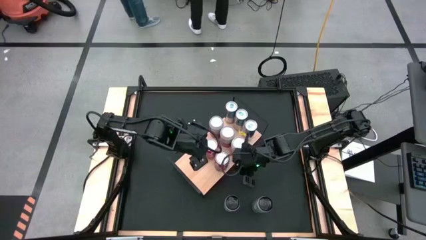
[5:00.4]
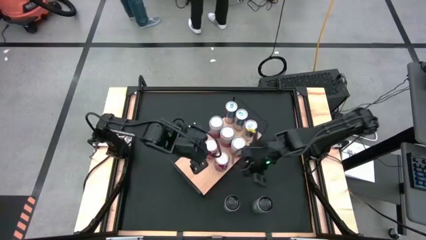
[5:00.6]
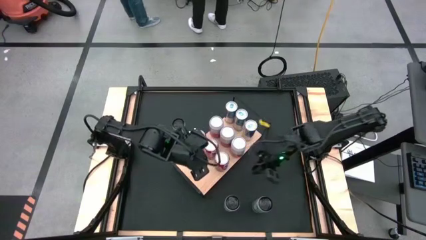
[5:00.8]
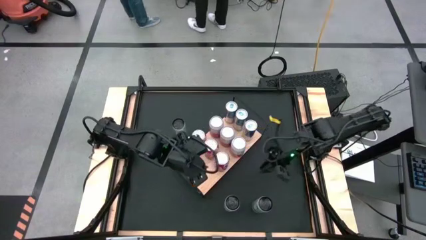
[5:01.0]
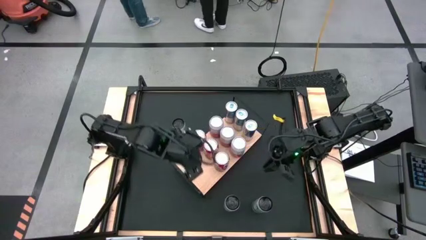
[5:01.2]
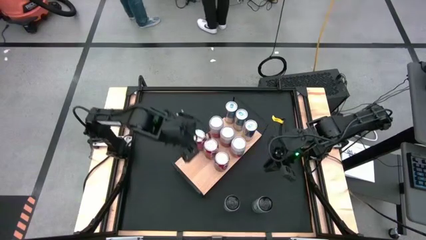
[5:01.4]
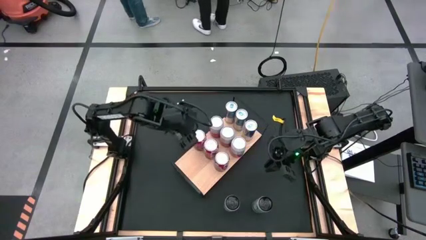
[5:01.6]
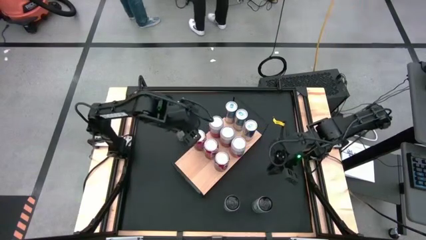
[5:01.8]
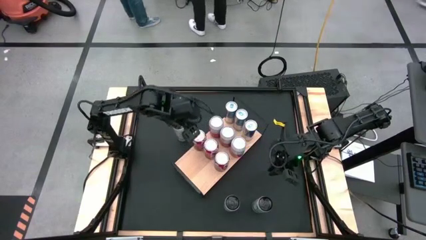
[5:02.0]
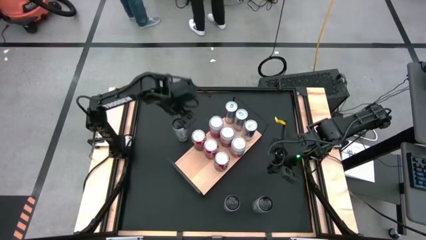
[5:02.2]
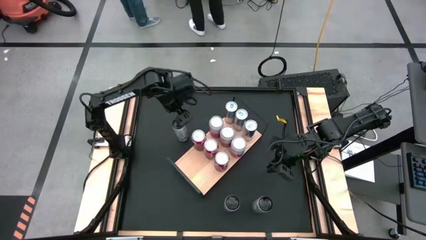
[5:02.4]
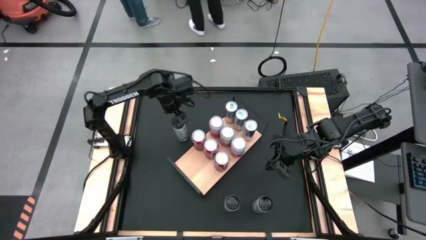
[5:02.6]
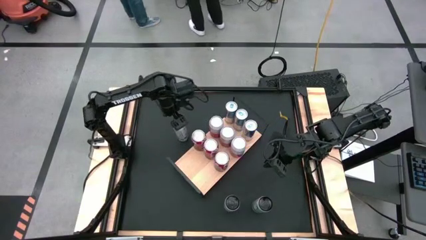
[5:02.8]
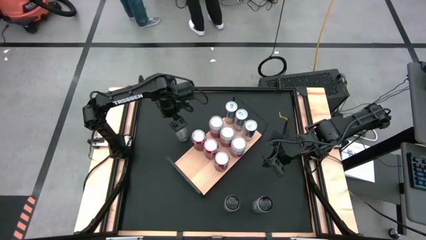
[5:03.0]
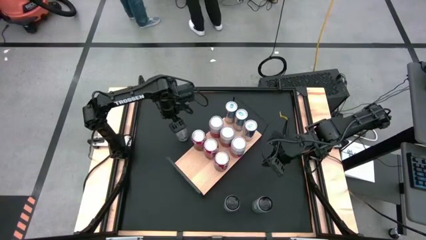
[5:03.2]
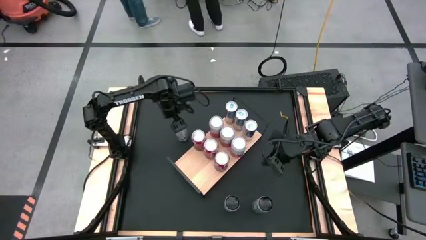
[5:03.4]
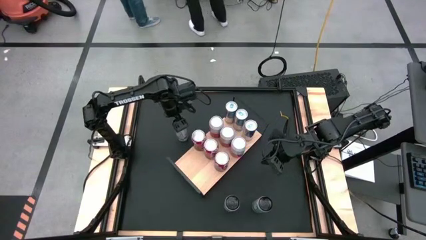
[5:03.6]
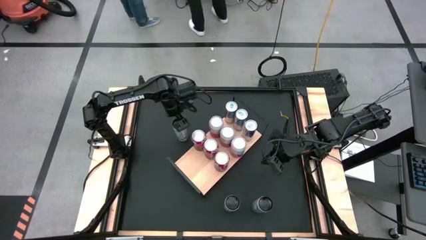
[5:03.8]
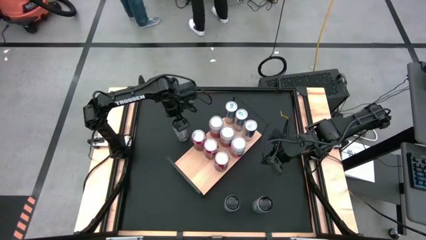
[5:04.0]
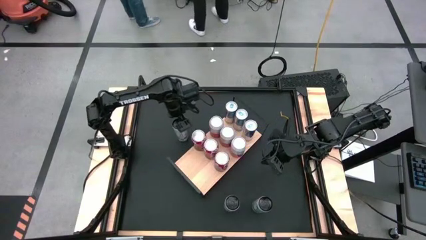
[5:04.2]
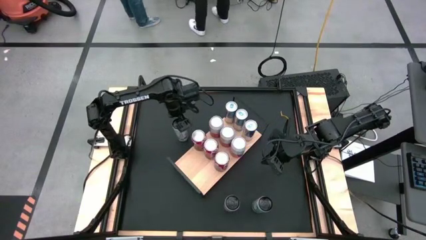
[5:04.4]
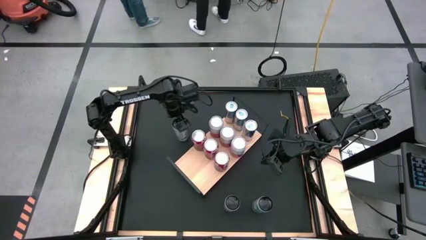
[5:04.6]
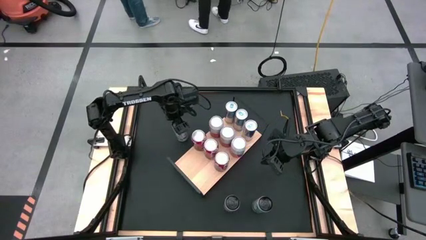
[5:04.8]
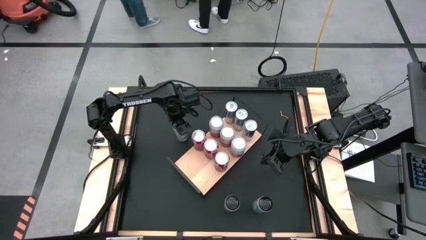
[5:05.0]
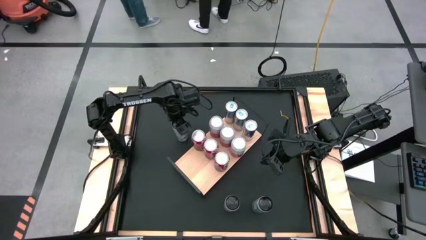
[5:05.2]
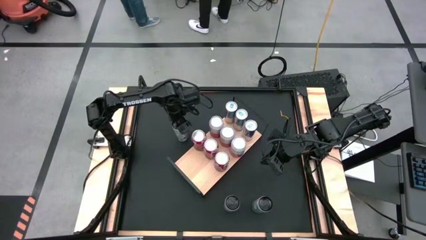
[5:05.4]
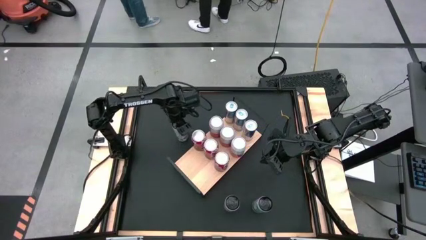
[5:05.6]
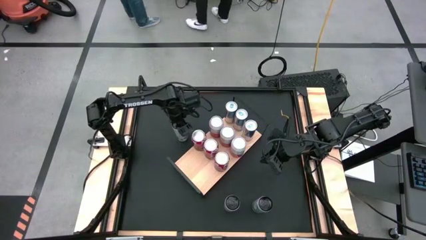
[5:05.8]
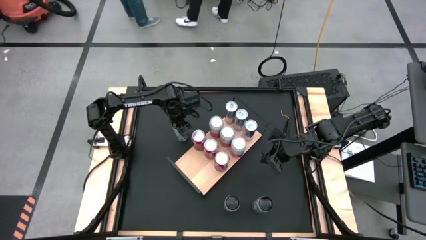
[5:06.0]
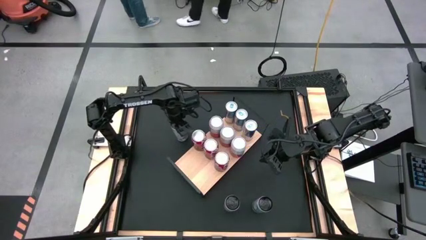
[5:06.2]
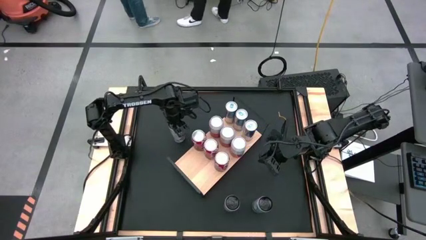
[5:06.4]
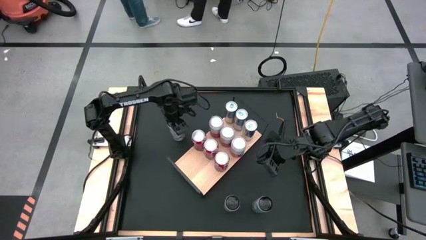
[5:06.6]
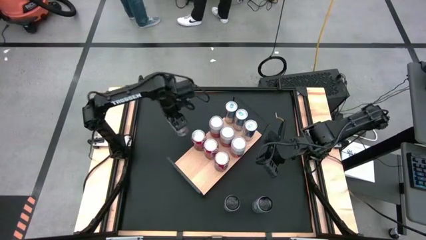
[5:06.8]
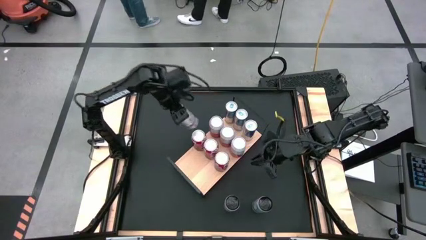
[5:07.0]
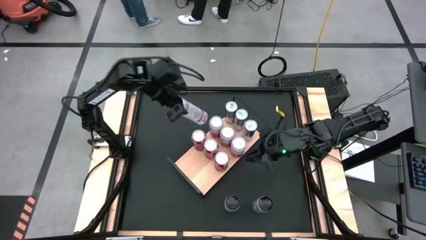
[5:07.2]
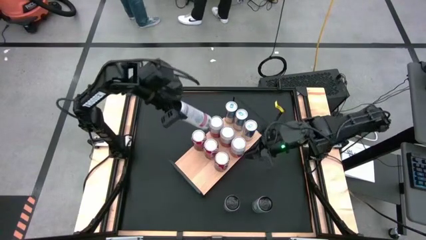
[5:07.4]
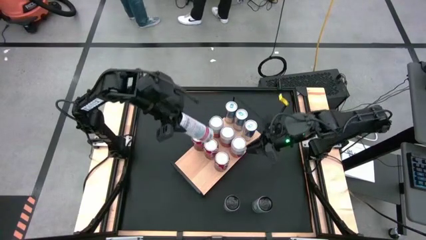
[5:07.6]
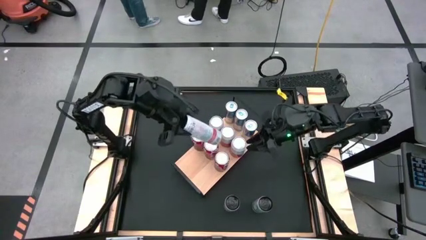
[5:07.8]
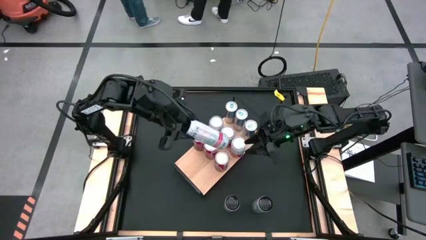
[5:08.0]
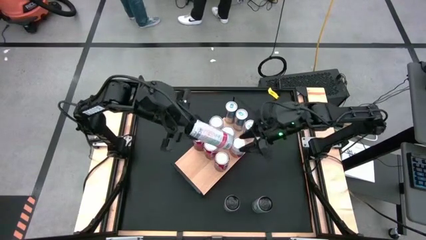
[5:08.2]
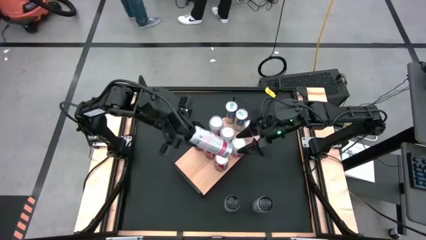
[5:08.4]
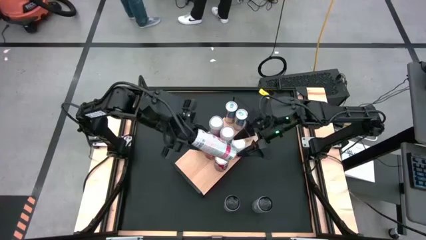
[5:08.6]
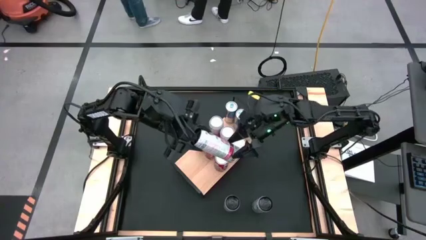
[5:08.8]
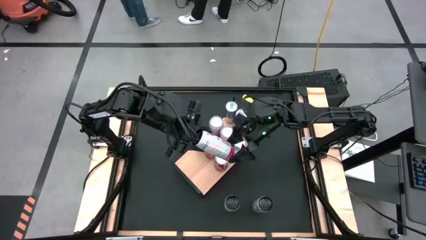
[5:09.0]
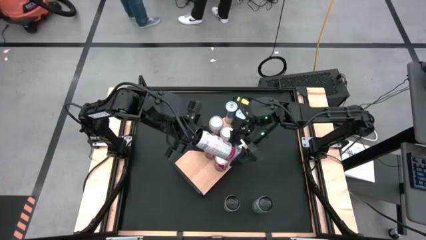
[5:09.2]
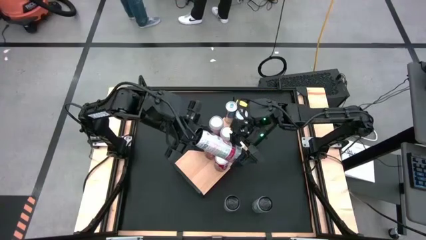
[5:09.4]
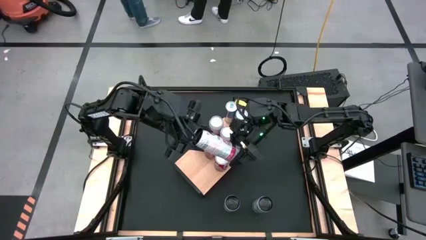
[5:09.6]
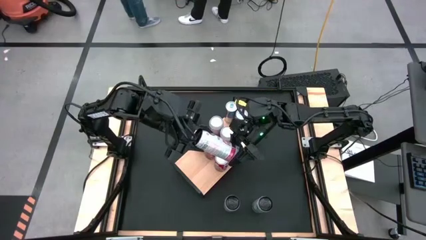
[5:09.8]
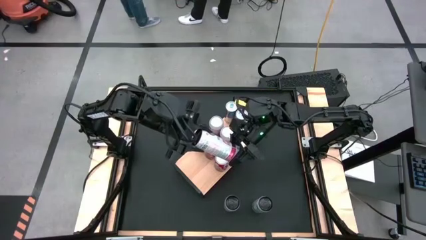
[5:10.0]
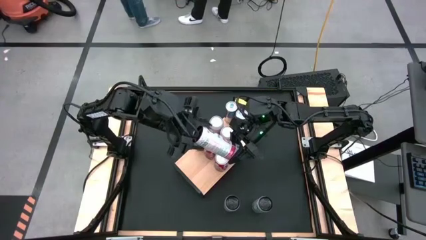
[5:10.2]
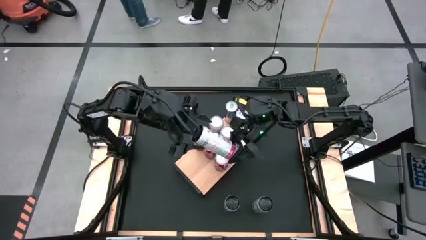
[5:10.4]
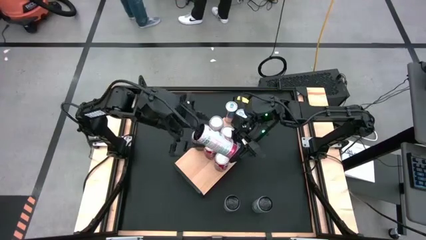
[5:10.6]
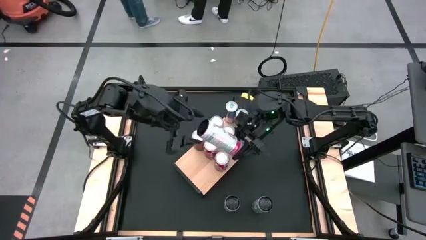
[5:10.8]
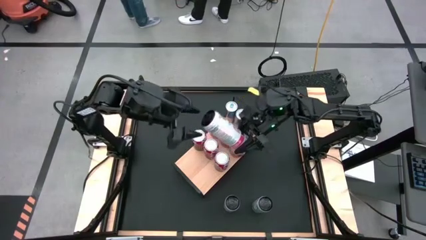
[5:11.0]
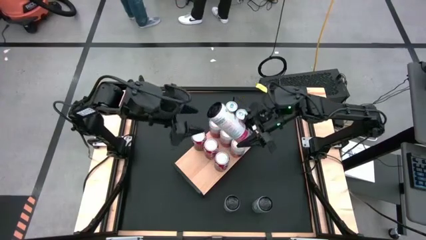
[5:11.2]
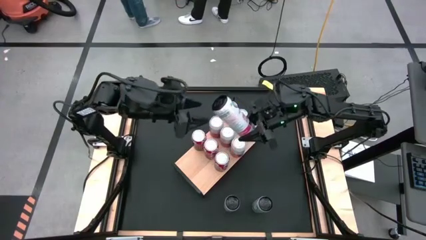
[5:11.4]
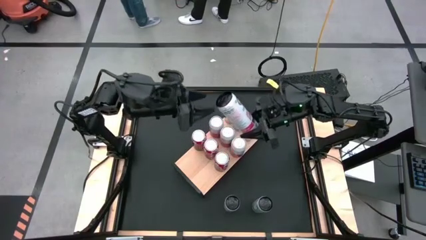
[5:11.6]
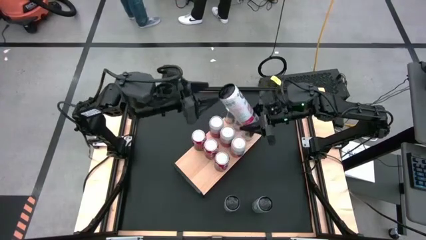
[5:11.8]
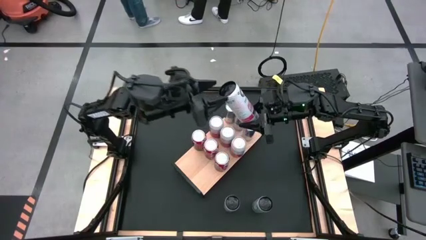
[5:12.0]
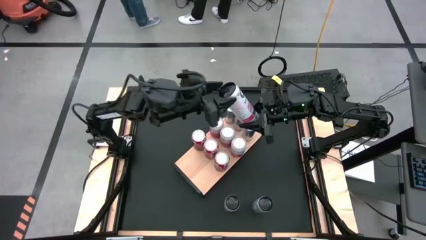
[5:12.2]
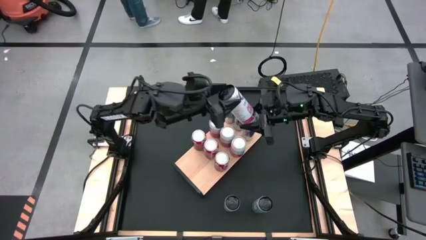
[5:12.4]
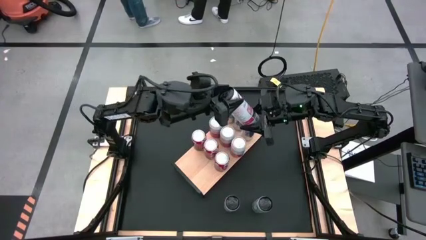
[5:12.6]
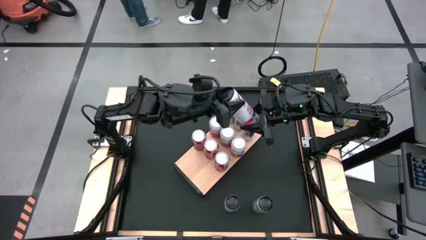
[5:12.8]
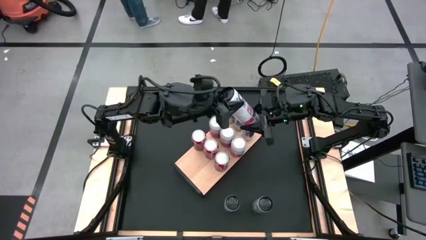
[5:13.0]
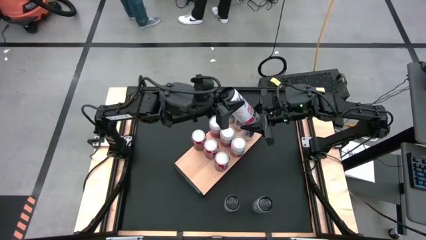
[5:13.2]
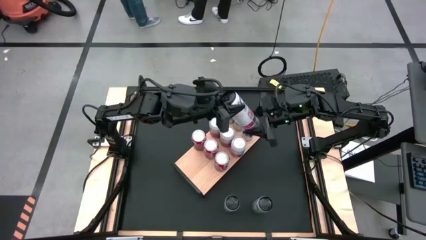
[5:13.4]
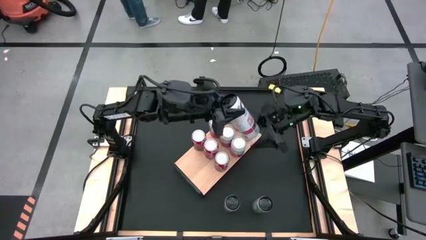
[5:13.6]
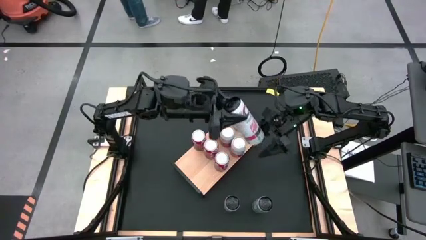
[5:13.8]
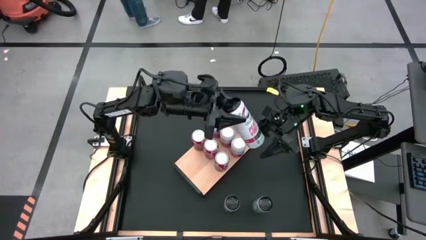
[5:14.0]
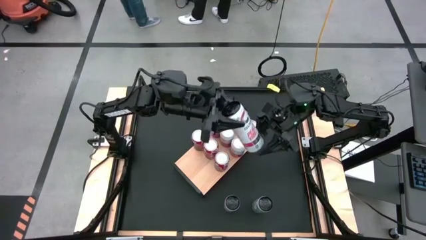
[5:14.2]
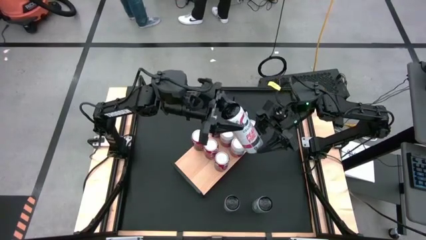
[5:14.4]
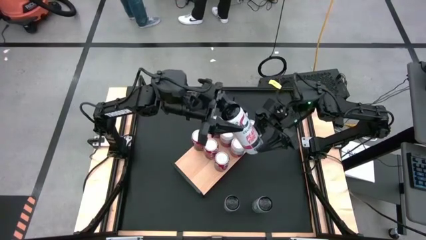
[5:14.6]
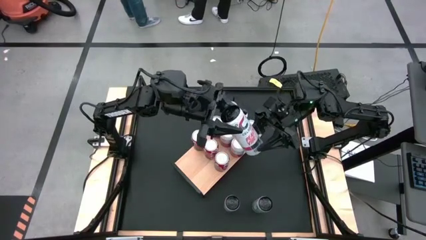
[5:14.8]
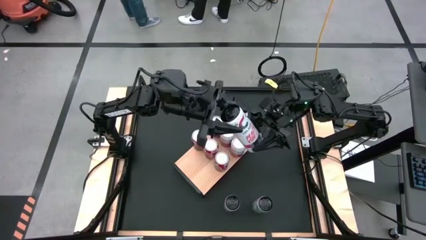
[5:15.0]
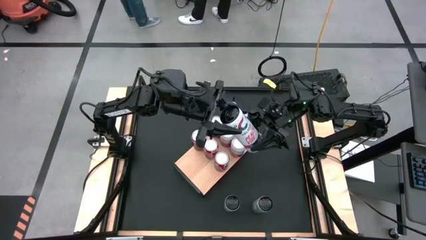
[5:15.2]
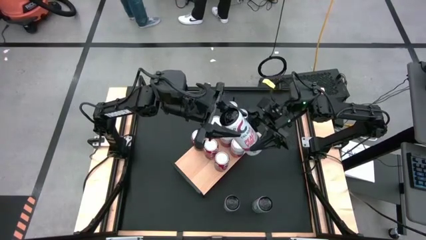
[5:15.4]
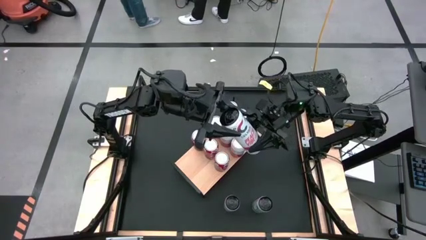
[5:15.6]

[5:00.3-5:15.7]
Task: Place canned beverage on shelf
Put the top left white pink soda can on the shelf
